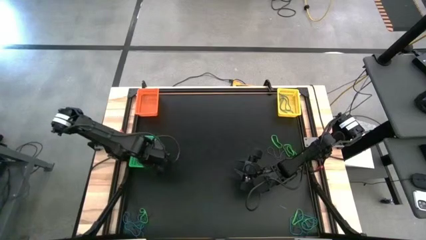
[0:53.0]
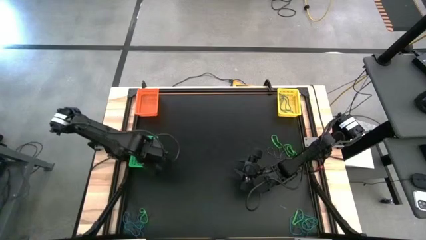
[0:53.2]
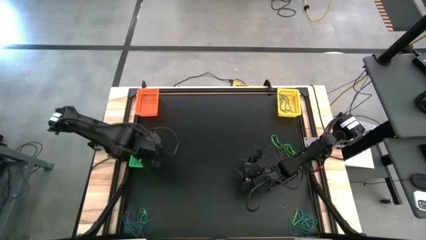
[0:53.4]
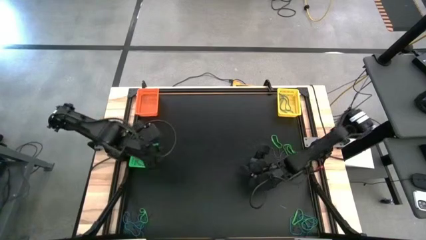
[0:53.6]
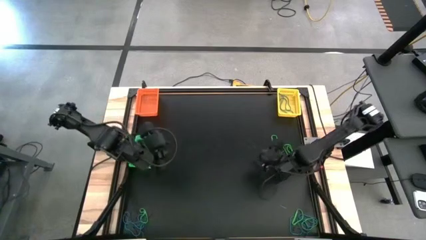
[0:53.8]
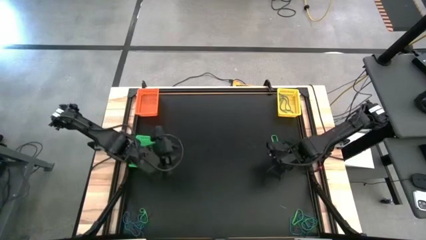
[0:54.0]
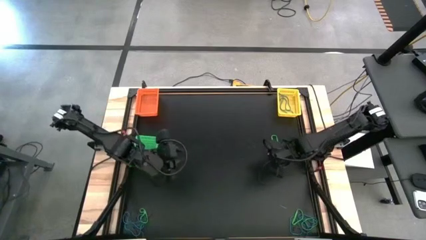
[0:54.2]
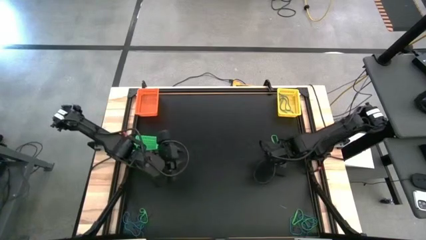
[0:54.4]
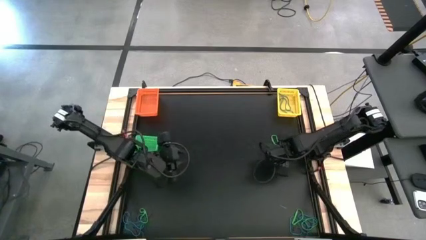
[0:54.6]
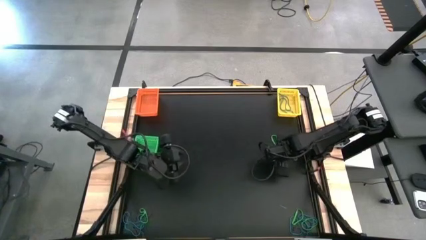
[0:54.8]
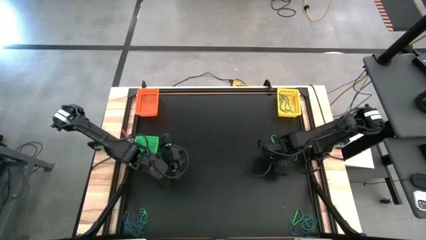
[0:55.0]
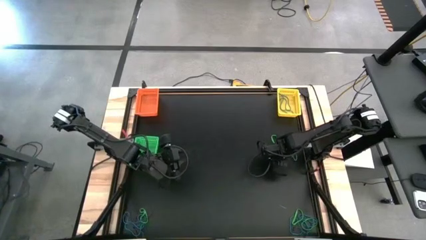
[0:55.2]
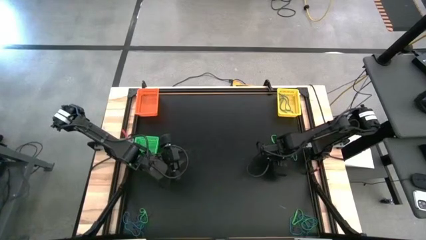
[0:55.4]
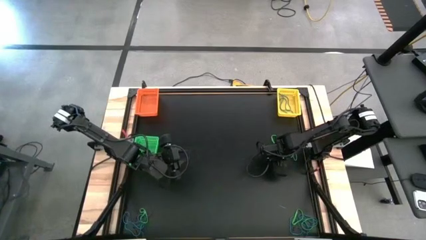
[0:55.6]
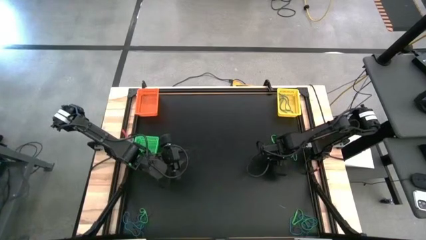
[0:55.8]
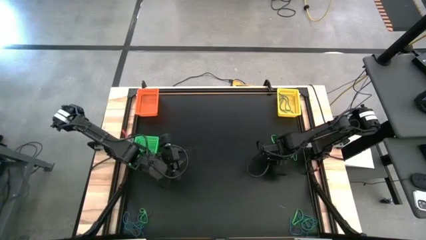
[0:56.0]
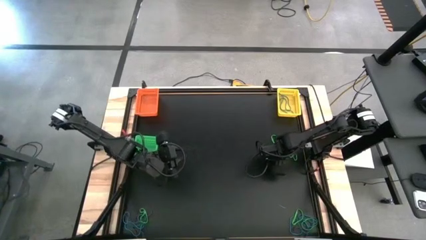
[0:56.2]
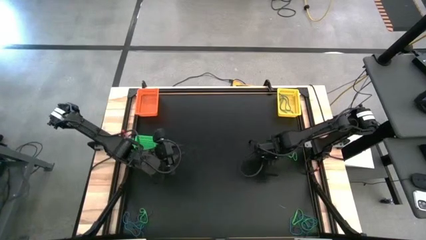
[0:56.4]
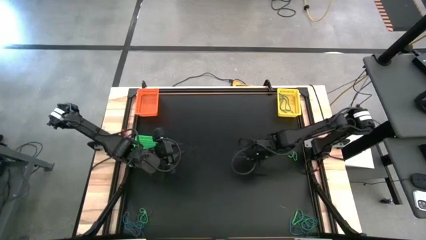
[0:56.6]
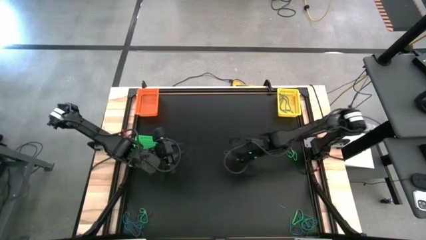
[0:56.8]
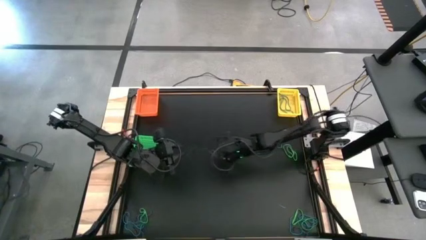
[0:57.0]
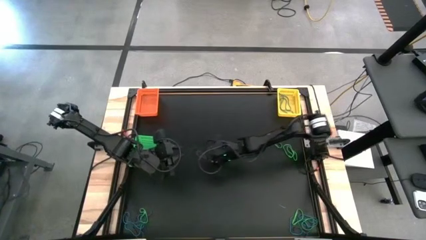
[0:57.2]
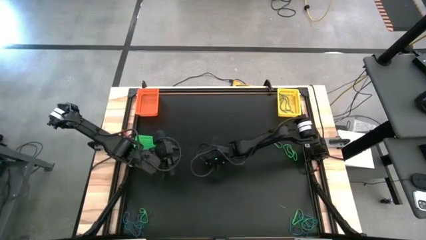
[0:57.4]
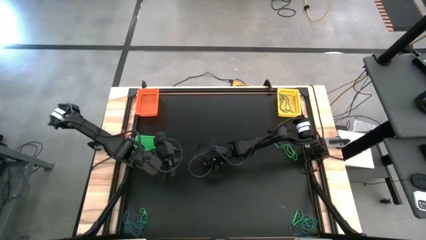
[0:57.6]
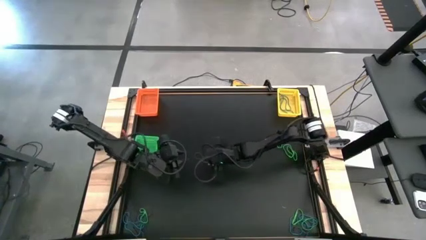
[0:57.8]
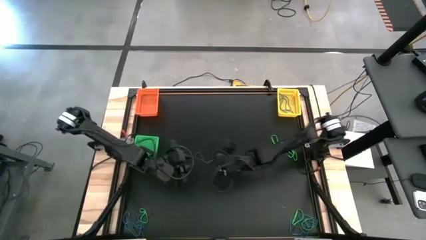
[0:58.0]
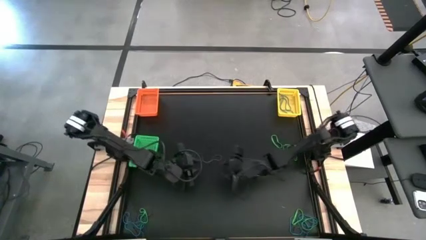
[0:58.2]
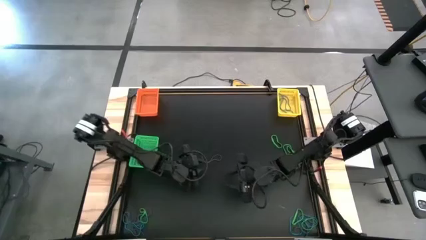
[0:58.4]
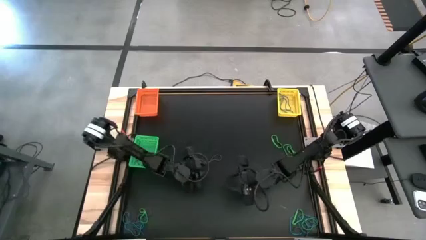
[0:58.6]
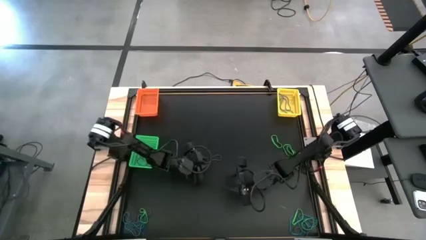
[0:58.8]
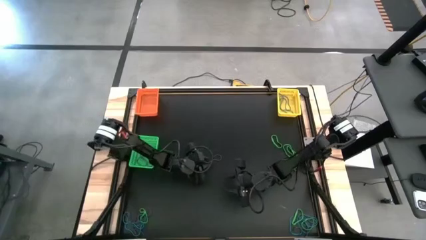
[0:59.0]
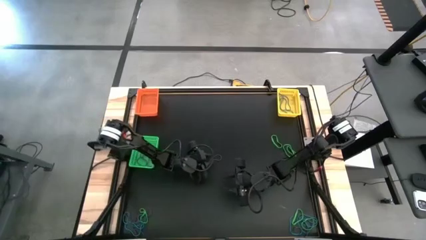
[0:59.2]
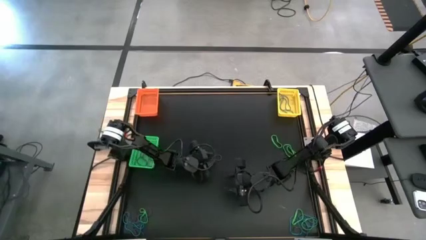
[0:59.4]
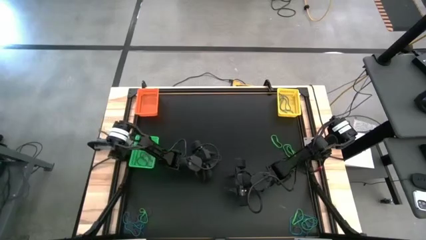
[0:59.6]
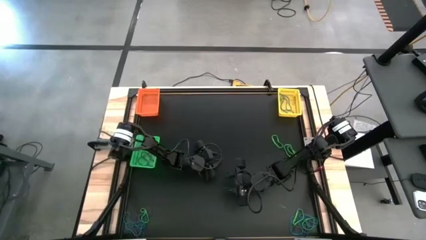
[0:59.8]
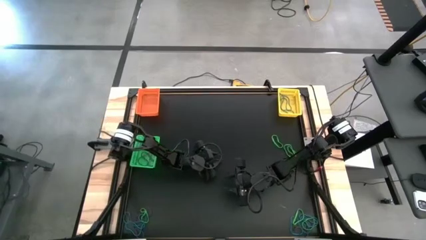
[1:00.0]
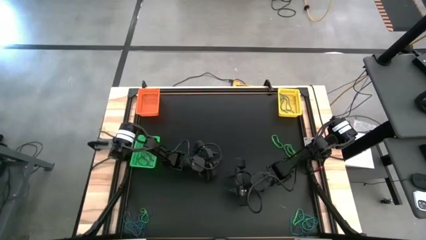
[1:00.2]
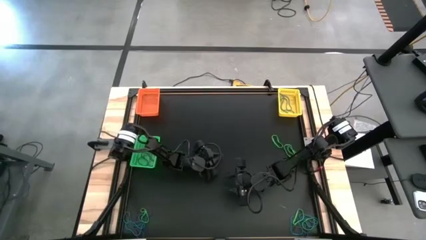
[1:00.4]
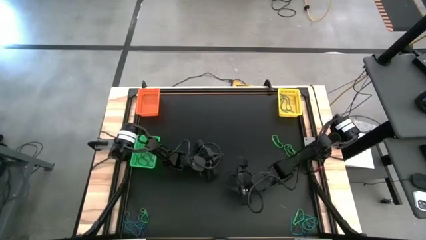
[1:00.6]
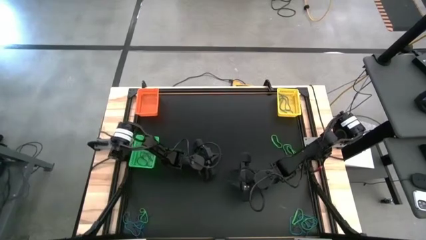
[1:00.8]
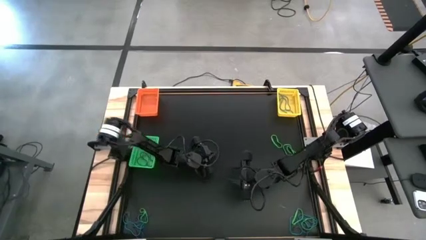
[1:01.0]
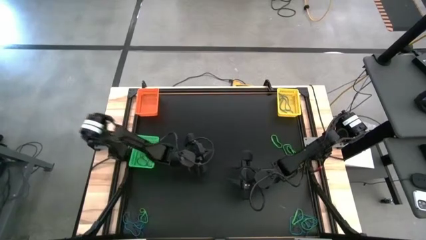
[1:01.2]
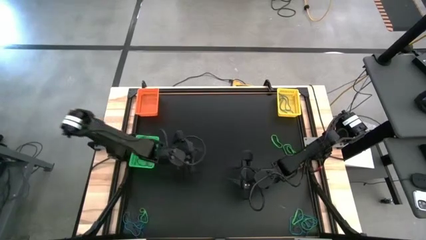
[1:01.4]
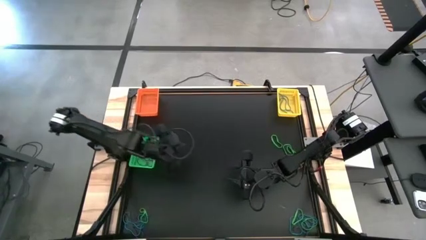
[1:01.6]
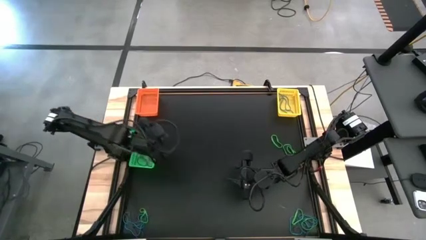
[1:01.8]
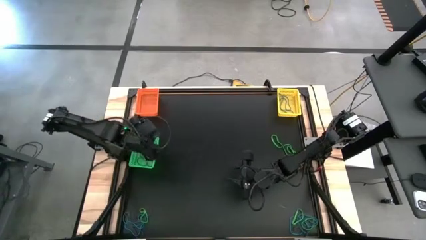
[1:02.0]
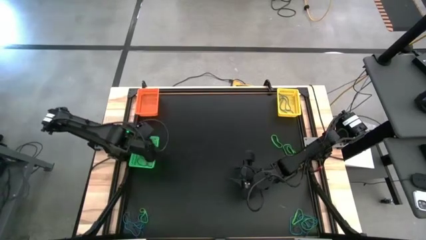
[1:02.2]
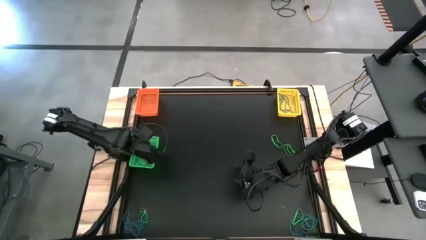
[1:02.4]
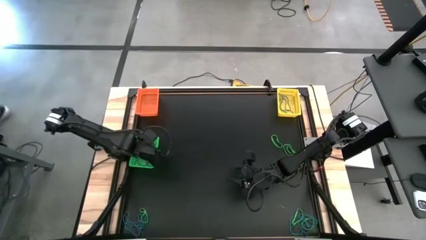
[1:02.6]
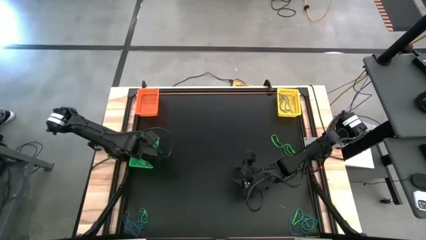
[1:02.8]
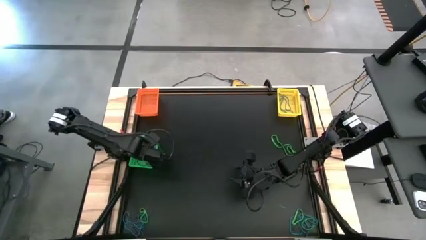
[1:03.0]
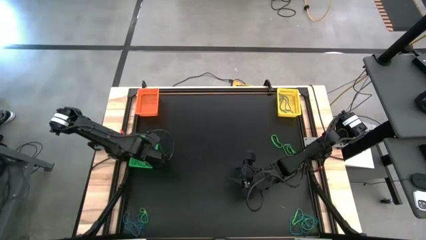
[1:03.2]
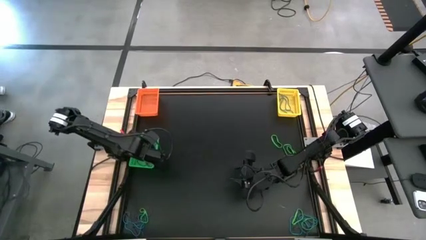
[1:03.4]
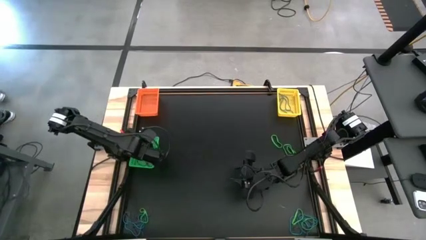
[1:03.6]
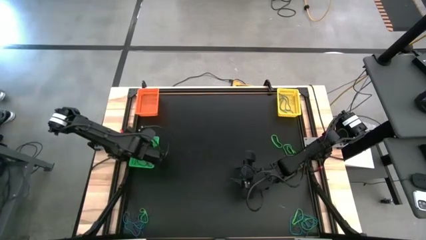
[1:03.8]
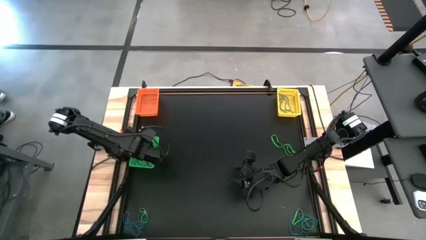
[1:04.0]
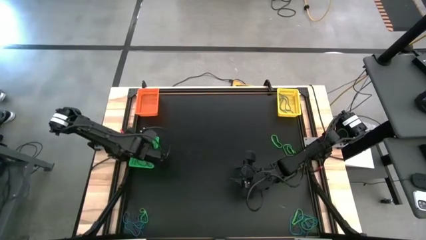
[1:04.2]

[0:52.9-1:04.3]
Task: Sort rubber bands into baskets
Put the middle right violet rubber band into the green bin

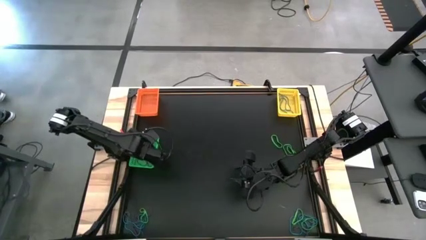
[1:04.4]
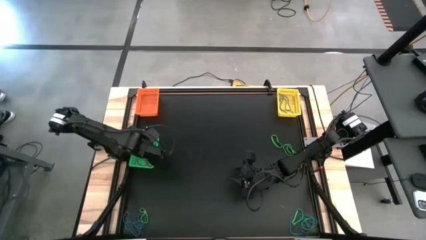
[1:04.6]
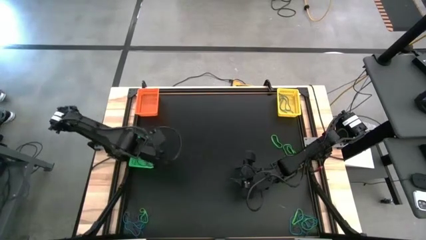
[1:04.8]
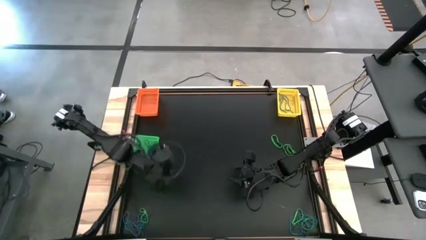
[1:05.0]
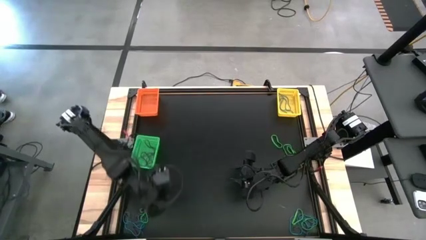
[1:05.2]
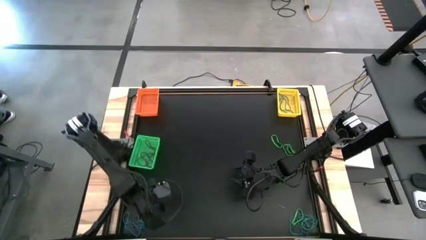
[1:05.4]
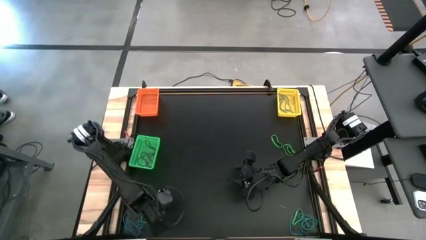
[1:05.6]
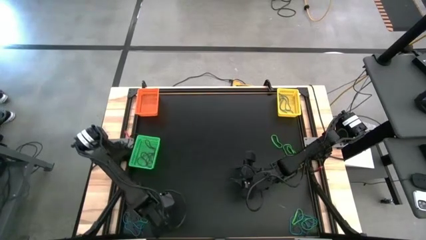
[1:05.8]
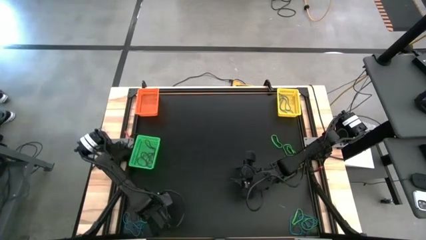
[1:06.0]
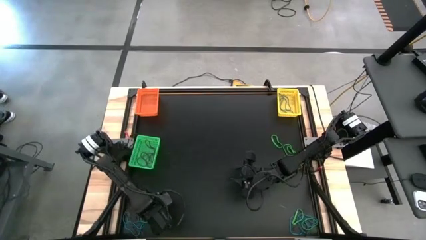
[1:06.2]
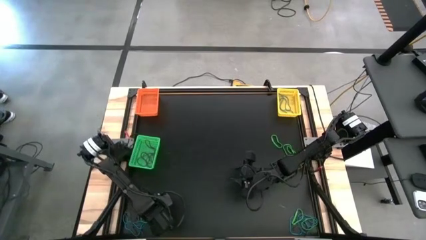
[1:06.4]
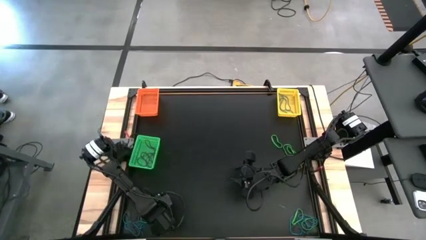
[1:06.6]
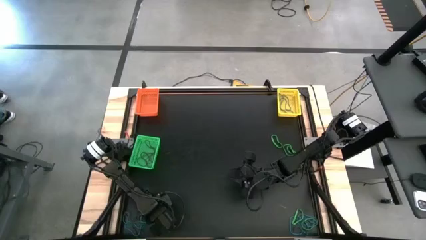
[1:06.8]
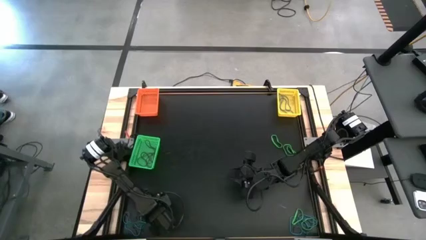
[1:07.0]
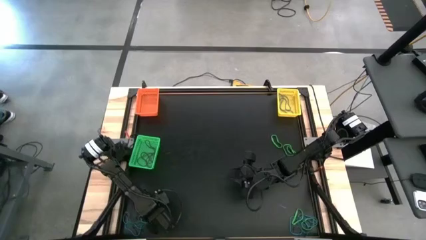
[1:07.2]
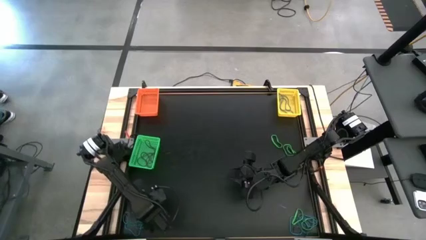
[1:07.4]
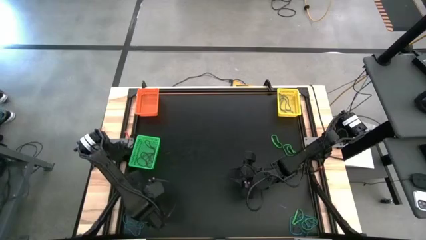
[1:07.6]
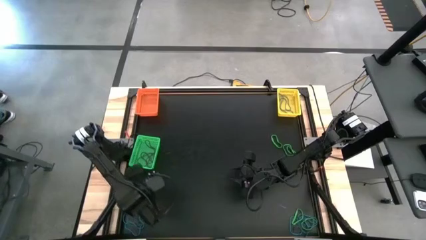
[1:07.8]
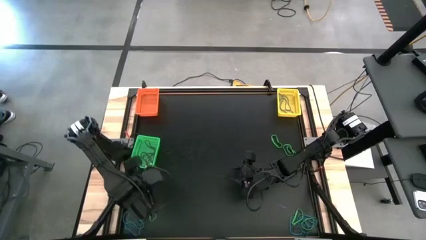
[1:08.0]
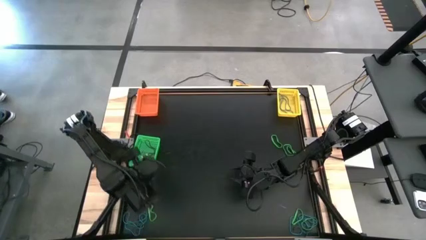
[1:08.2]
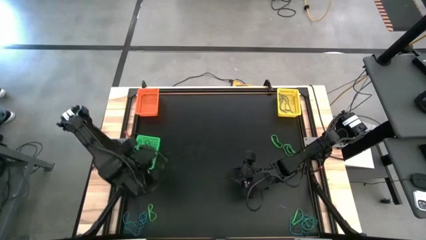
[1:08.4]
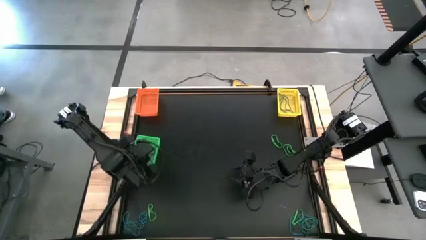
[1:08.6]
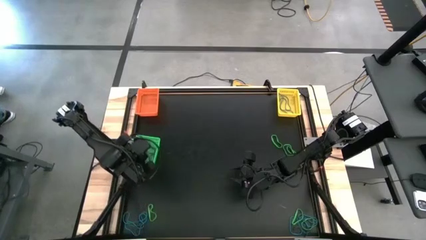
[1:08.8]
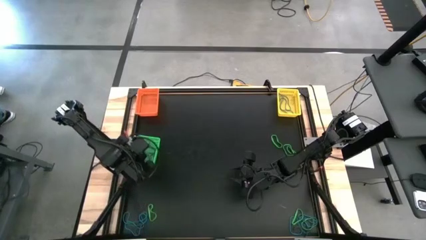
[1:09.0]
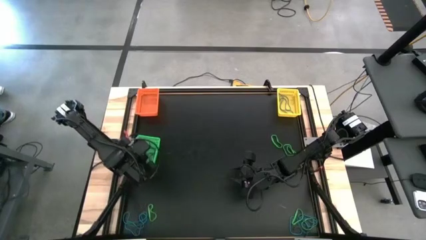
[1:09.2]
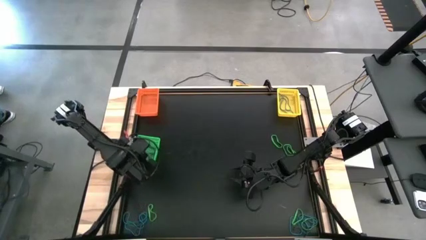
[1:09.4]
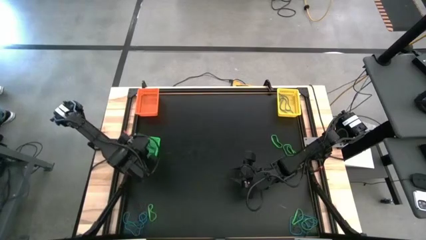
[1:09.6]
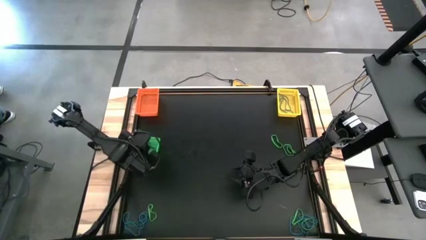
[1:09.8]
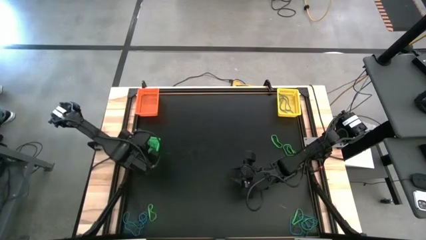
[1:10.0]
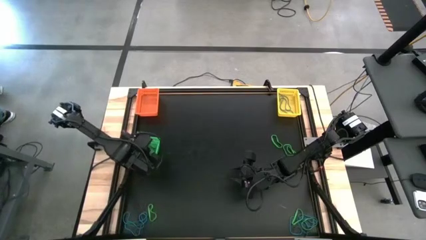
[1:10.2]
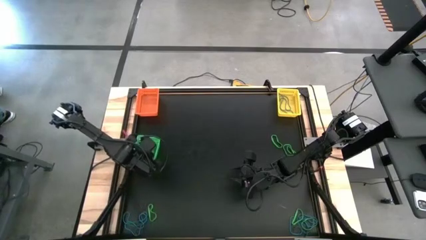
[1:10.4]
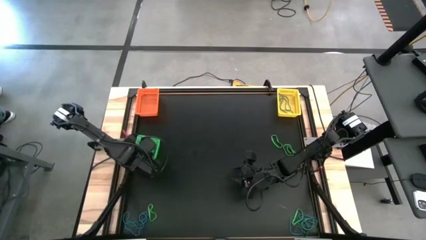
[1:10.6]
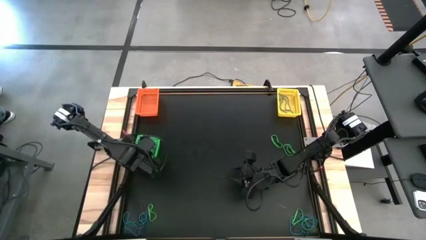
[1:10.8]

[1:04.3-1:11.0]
Put the bottom left violet rubber band into the green bin
